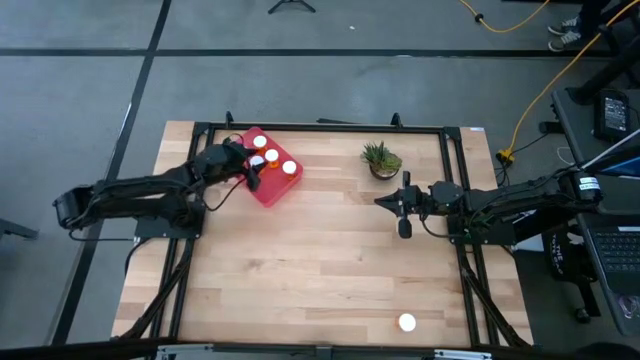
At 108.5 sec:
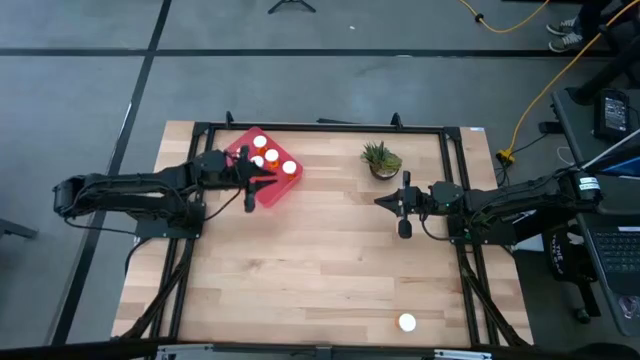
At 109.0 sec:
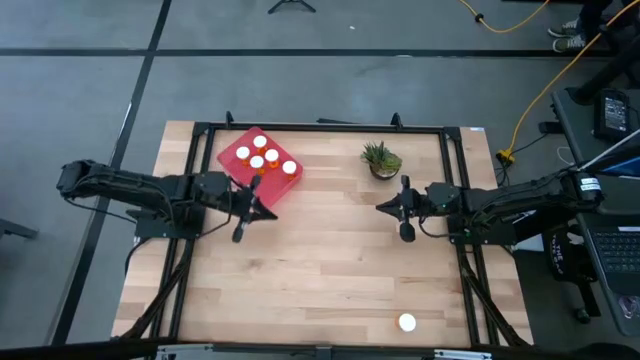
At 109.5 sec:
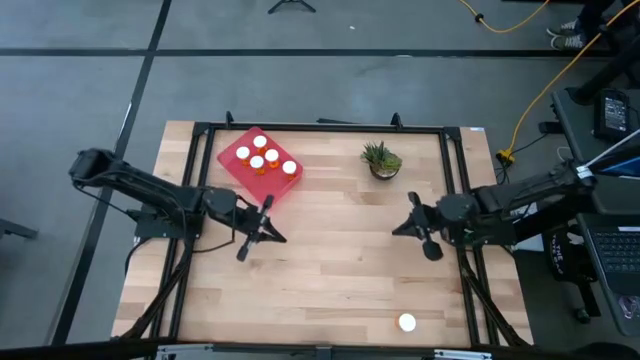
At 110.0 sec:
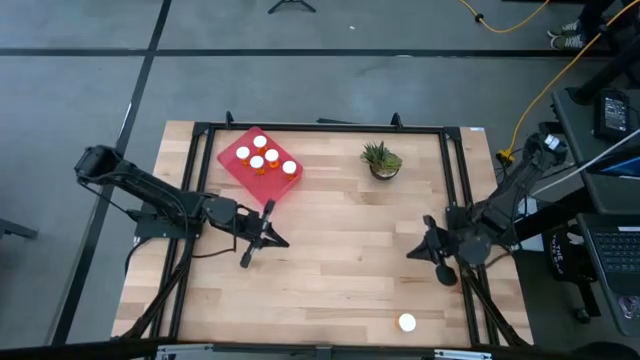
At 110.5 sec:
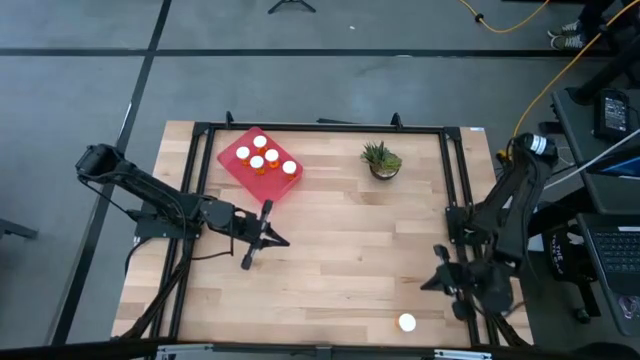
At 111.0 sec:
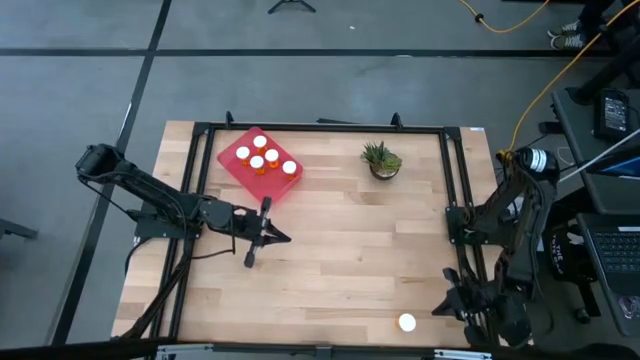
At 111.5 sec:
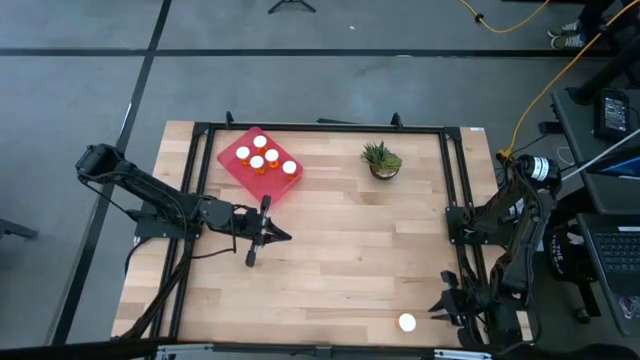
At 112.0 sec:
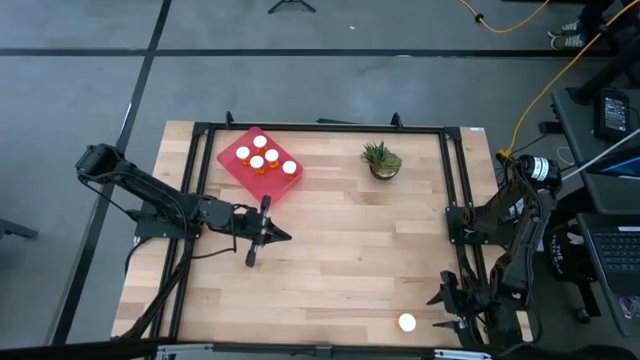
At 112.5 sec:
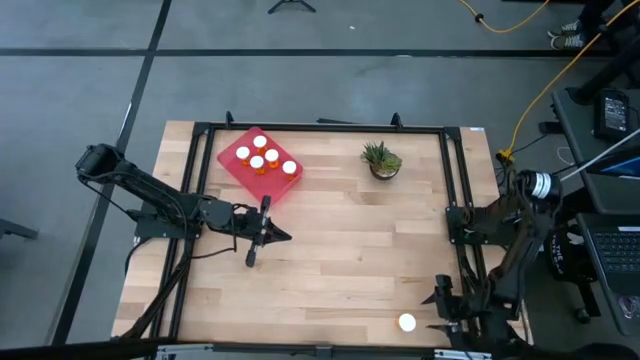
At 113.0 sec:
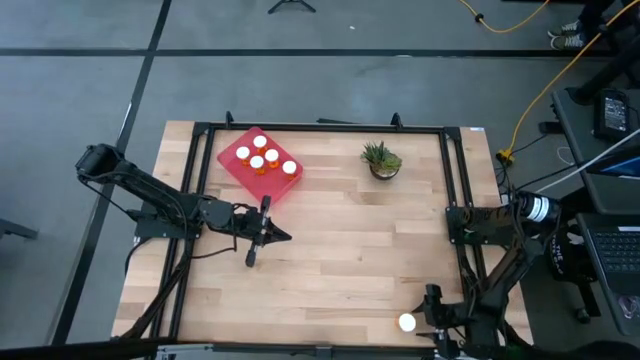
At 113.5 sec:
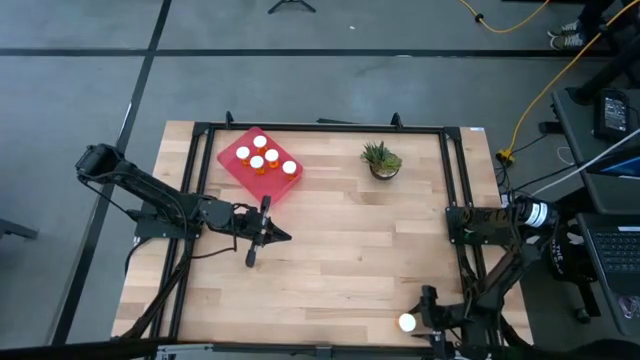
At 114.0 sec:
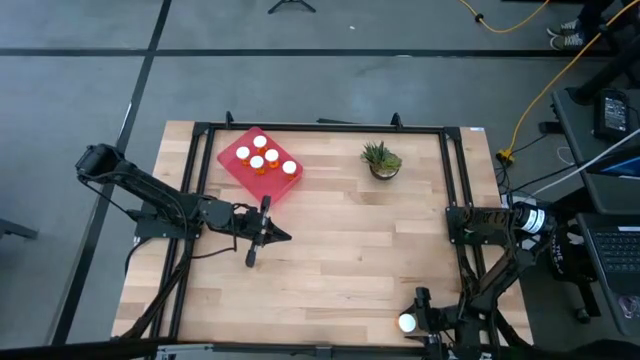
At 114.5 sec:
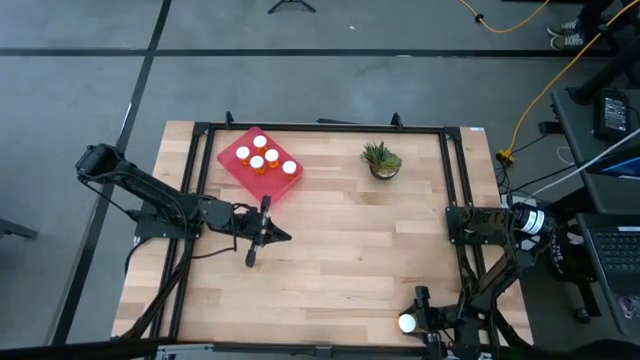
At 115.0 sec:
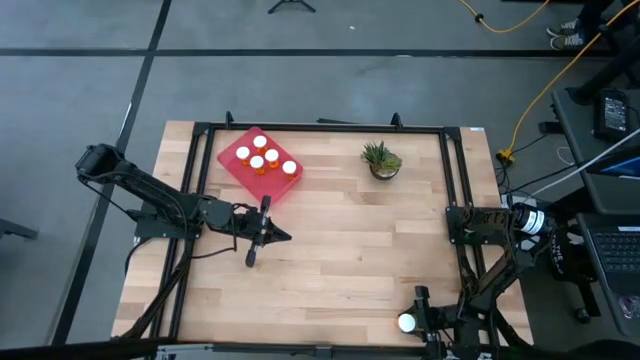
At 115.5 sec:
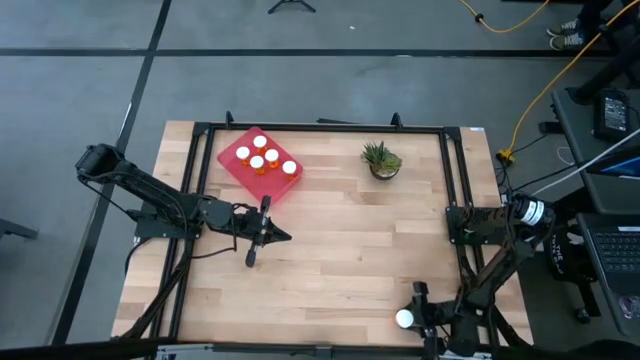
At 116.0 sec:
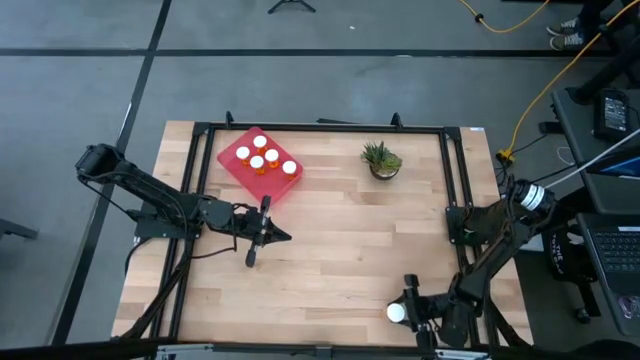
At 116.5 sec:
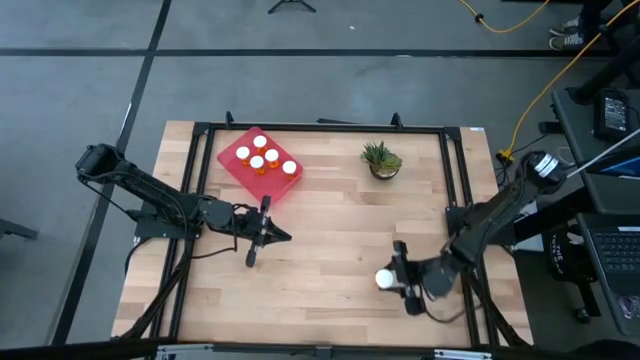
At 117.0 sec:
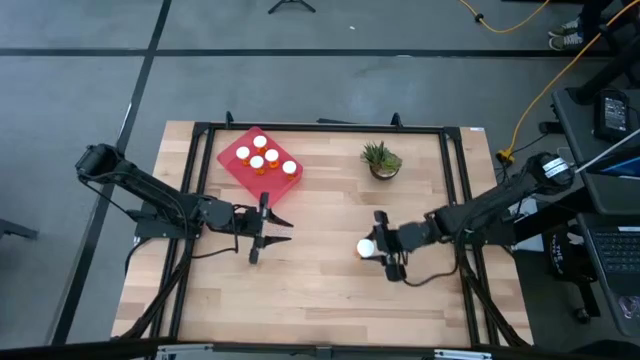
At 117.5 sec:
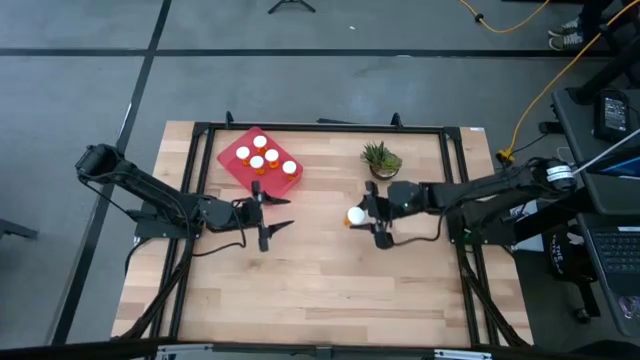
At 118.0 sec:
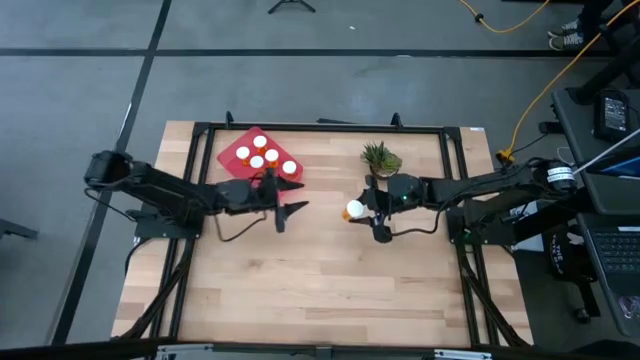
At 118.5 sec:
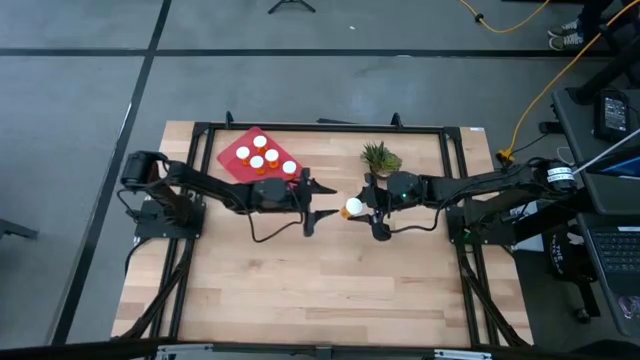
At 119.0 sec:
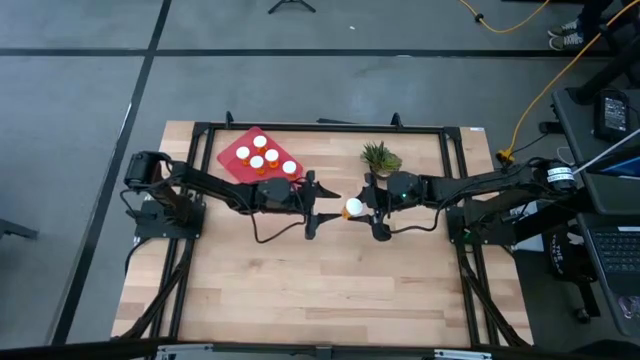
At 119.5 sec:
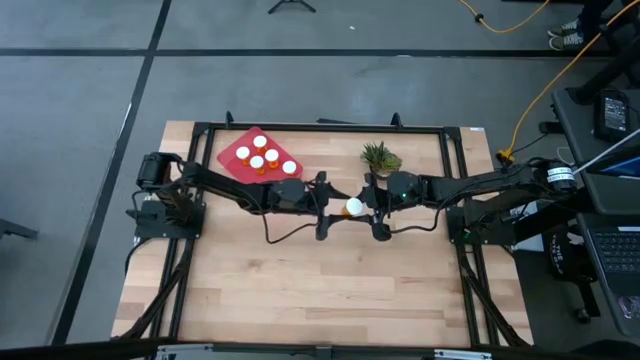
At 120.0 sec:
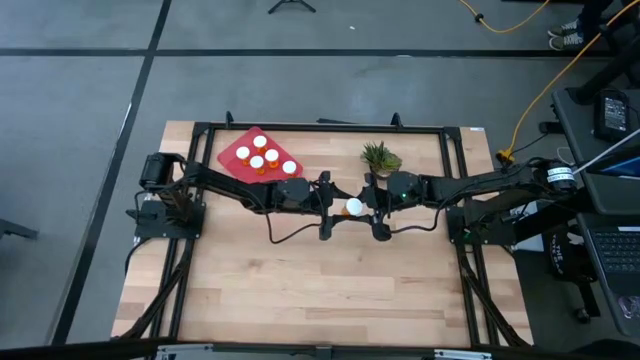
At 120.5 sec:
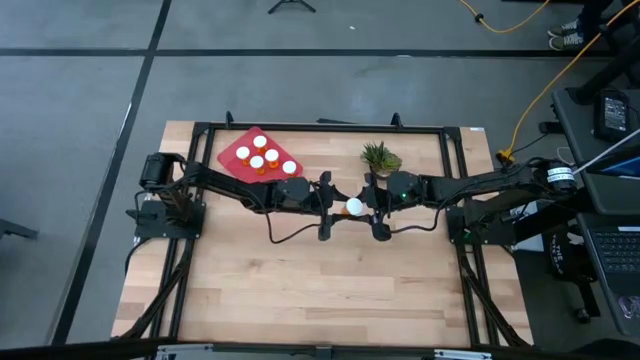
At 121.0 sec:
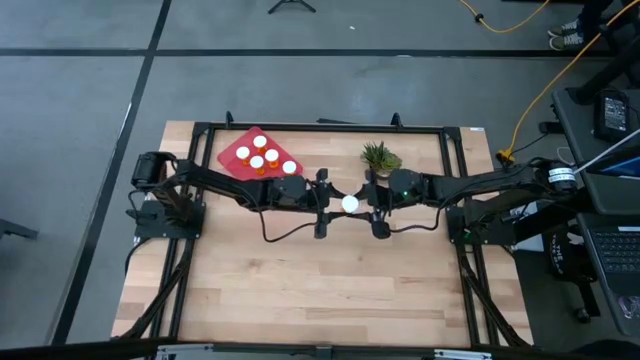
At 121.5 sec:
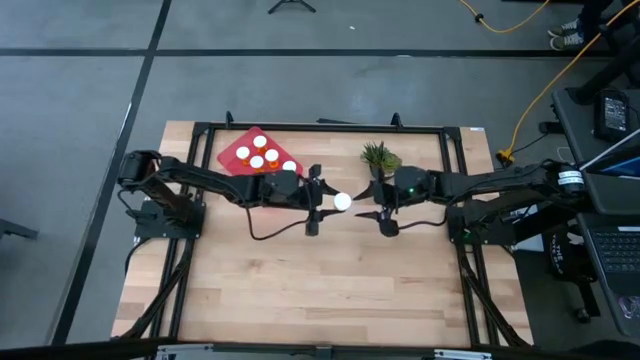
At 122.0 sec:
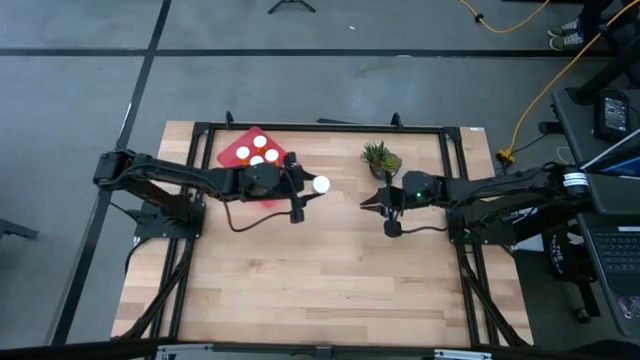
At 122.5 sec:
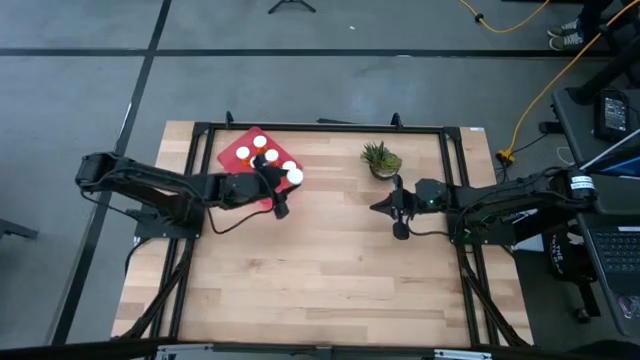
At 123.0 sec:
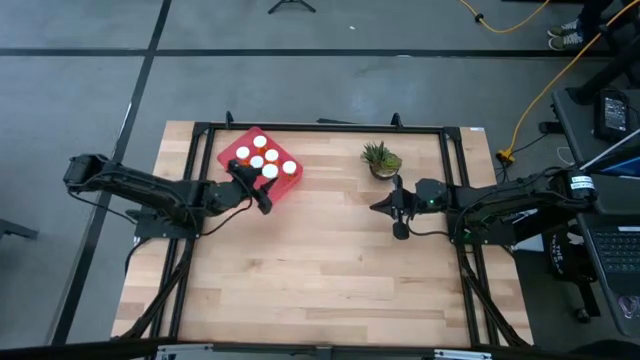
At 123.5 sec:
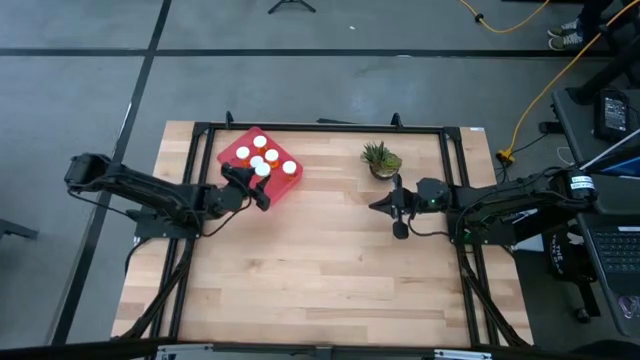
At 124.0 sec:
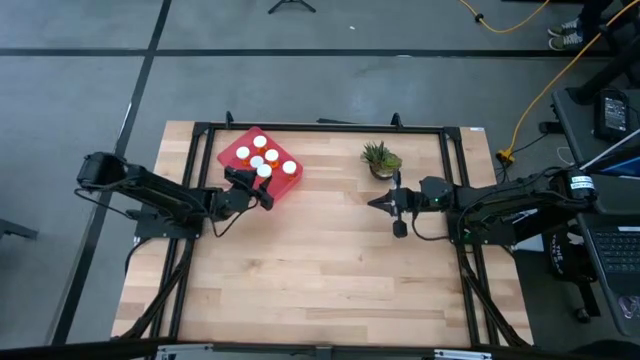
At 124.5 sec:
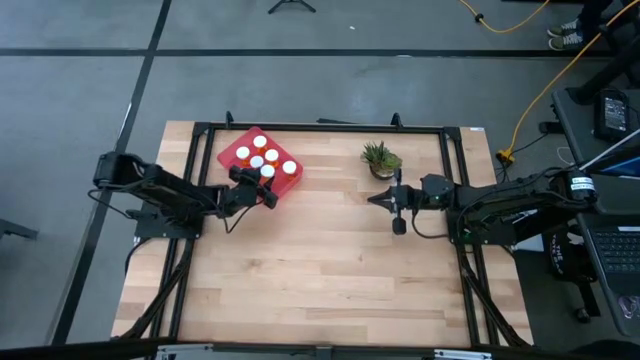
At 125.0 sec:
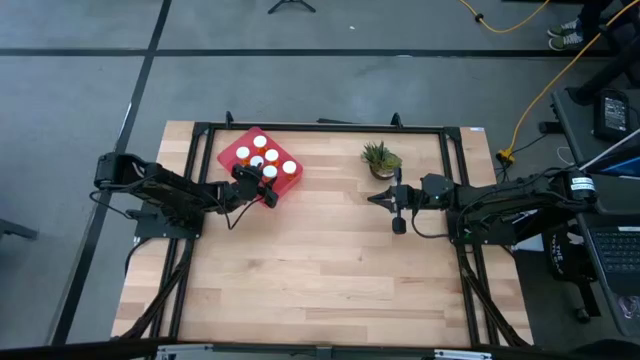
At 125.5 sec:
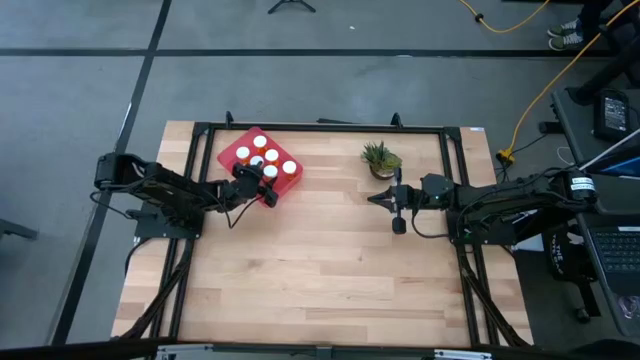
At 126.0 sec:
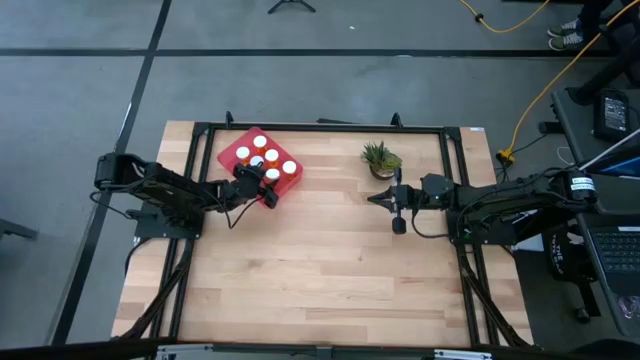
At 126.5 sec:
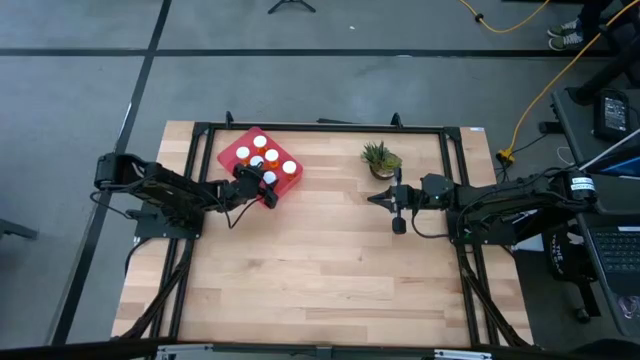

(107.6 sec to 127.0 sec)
Task: Pick and place pill bottles into a basket
Put the orange pill bottle into the red container

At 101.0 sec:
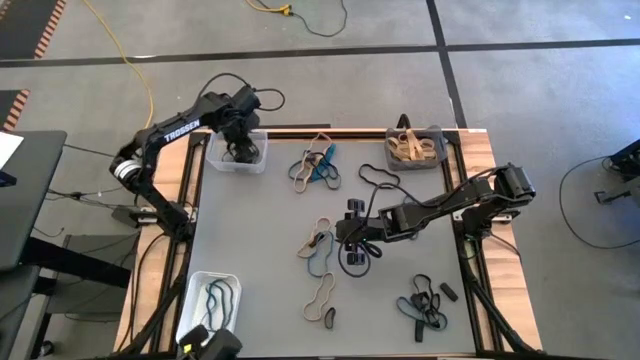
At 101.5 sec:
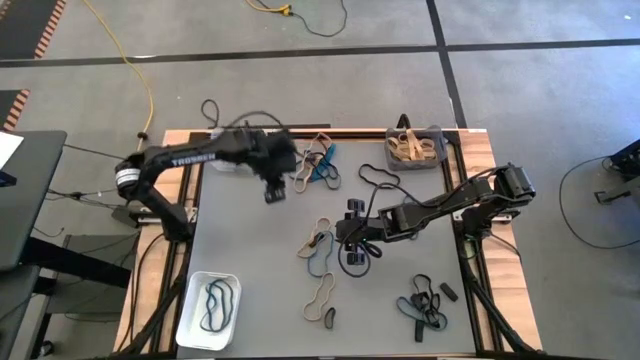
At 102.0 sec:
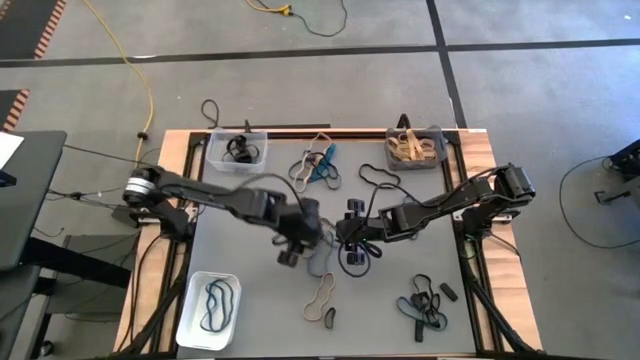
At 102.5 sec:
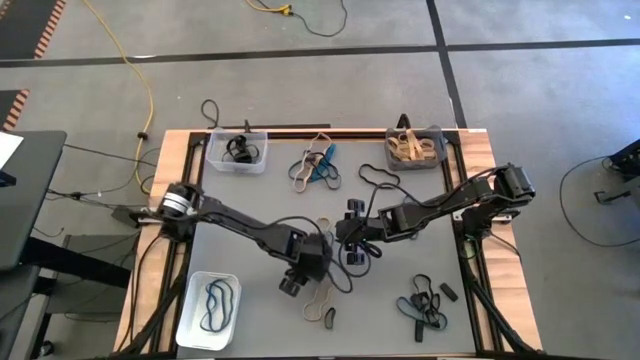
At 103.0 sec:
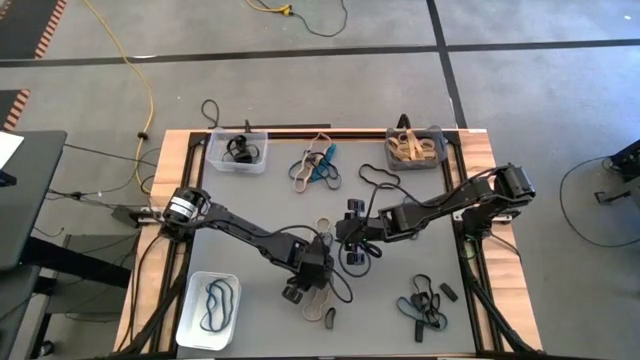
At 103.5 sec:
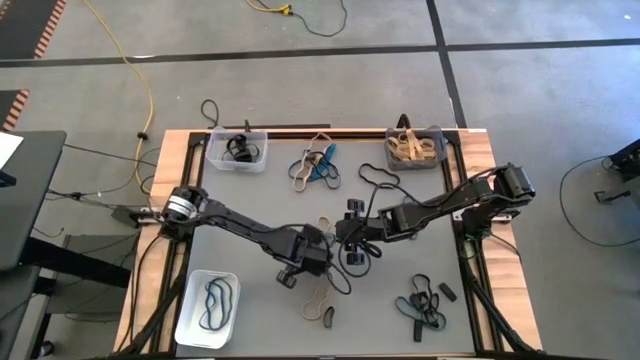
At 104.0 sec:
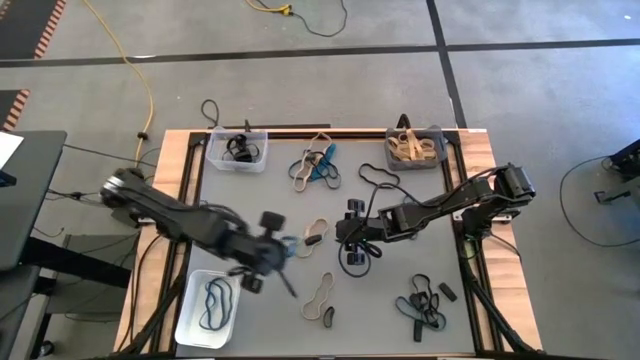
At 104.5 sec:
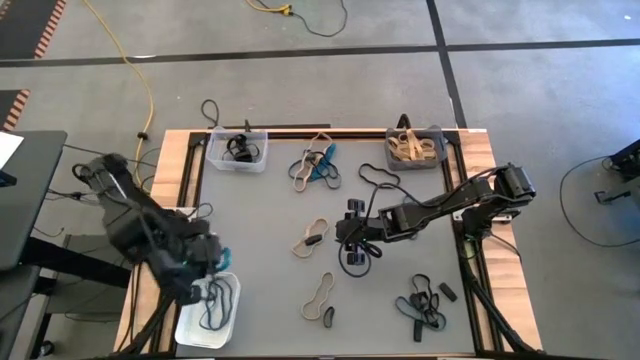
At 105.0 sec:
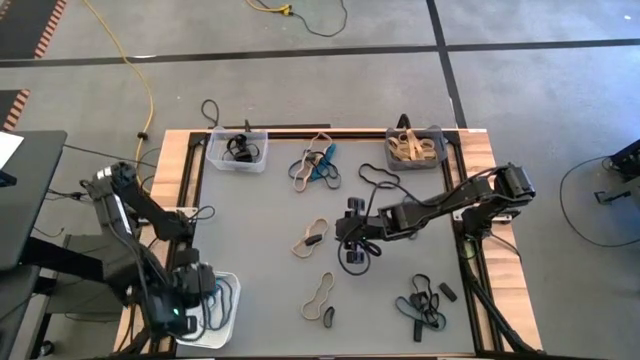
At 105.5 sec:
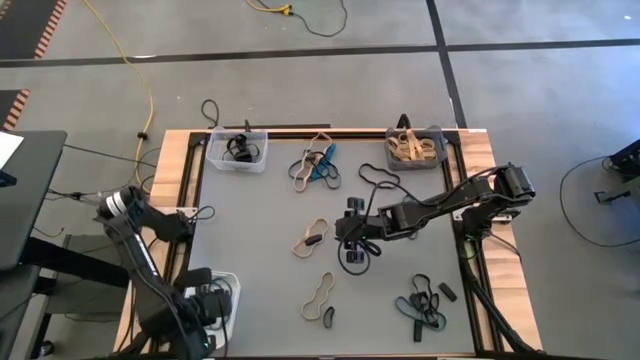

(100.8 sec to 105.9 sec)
Task: Sort rubber bands into baskets
Put the blue rubber band into the white bin
